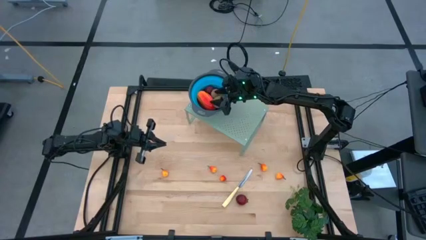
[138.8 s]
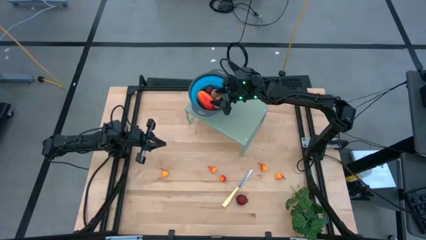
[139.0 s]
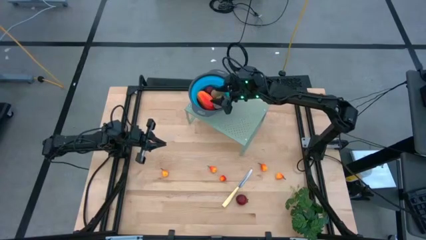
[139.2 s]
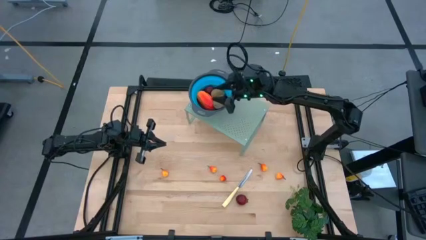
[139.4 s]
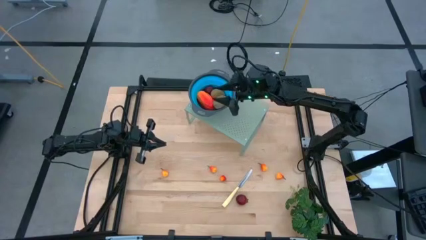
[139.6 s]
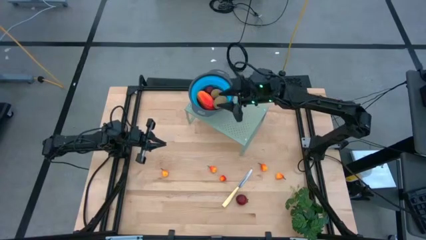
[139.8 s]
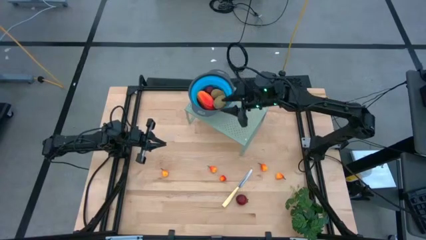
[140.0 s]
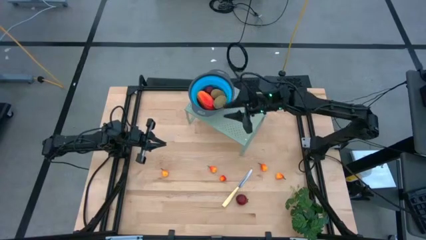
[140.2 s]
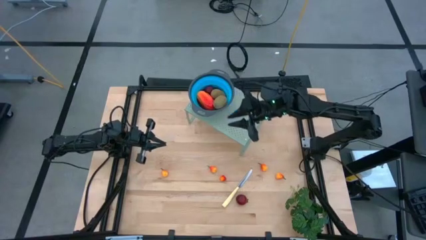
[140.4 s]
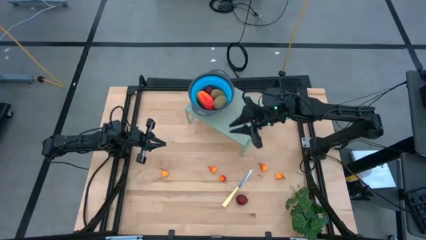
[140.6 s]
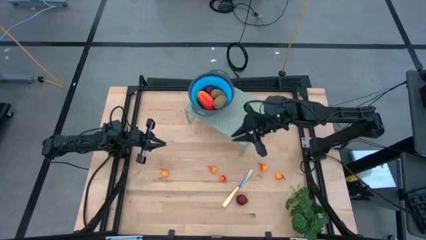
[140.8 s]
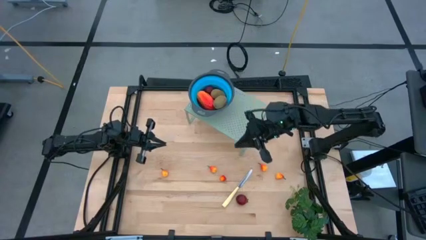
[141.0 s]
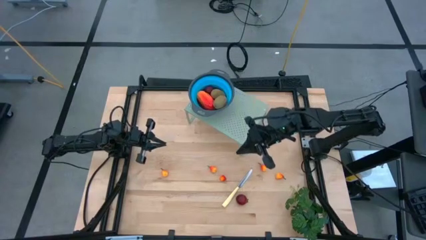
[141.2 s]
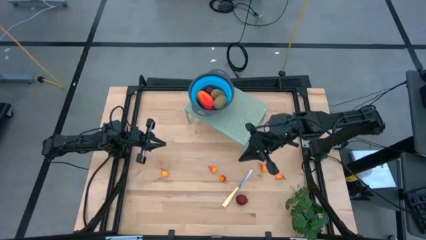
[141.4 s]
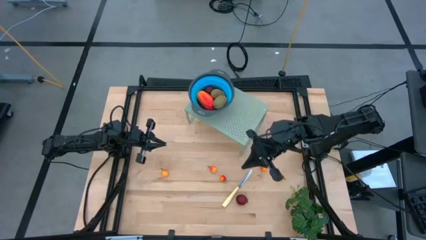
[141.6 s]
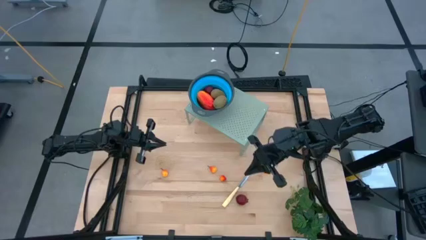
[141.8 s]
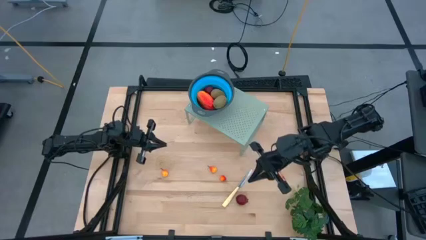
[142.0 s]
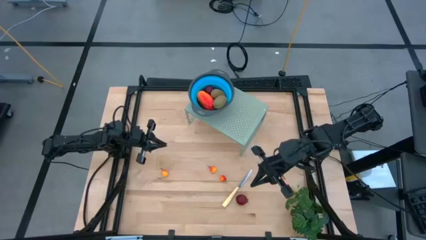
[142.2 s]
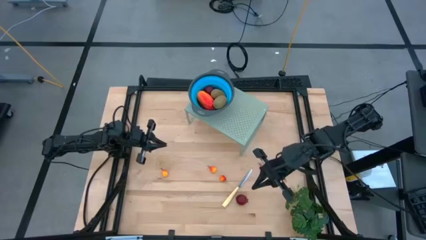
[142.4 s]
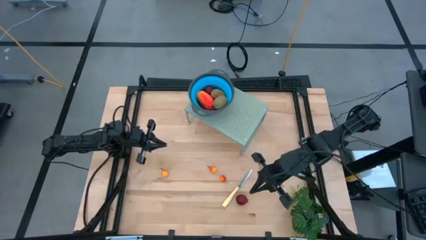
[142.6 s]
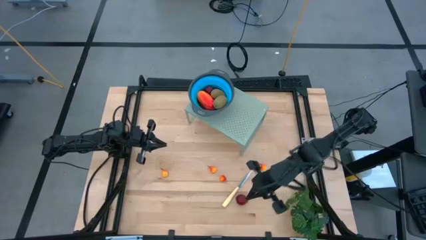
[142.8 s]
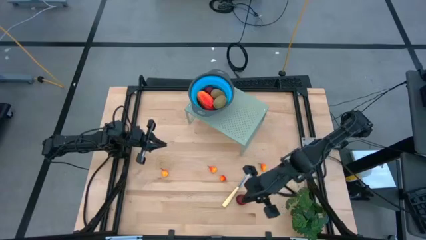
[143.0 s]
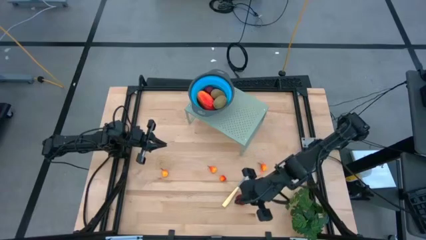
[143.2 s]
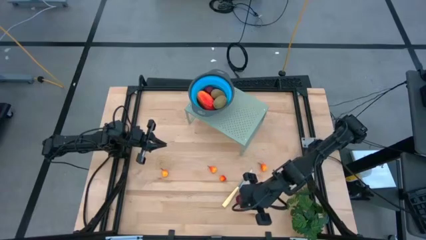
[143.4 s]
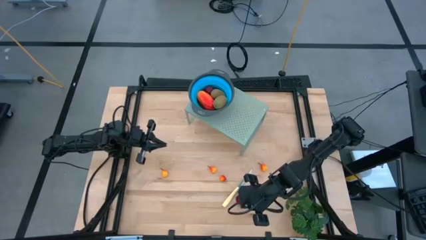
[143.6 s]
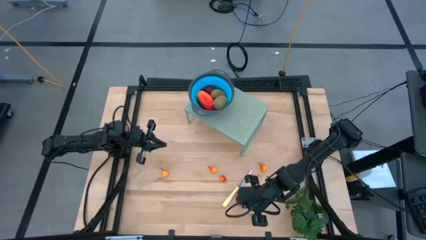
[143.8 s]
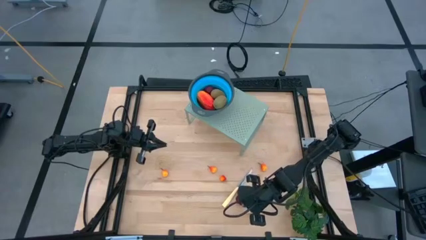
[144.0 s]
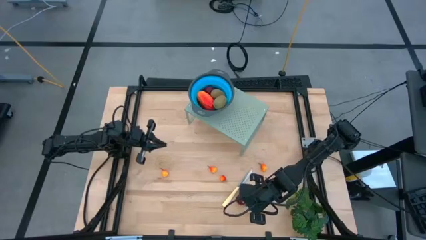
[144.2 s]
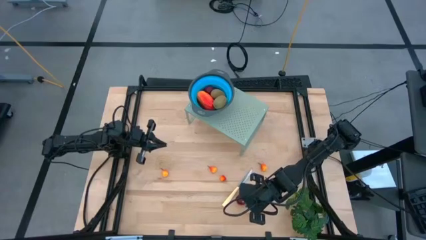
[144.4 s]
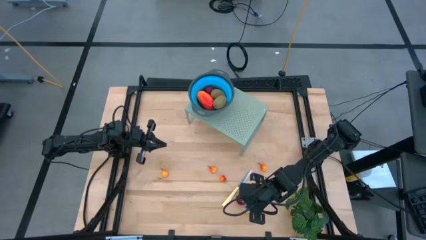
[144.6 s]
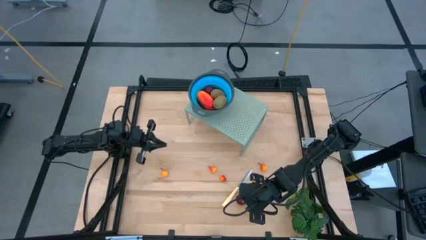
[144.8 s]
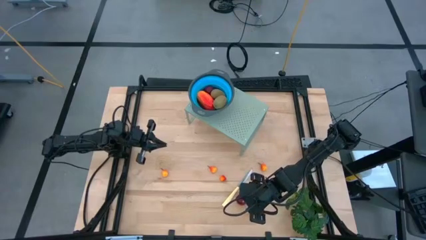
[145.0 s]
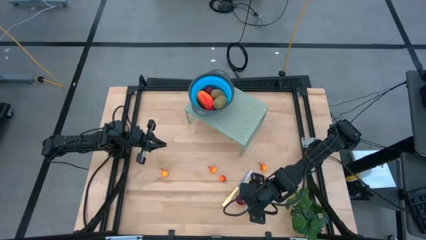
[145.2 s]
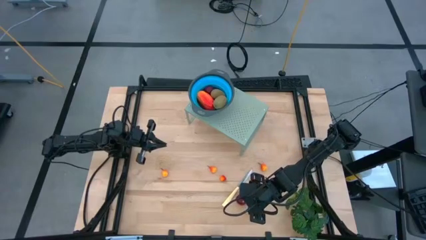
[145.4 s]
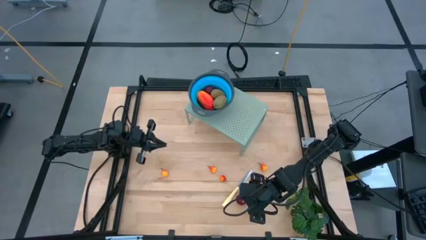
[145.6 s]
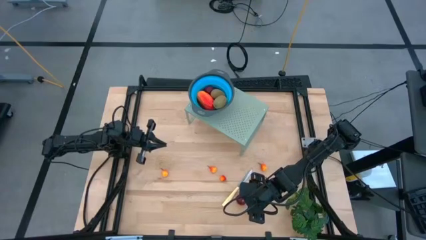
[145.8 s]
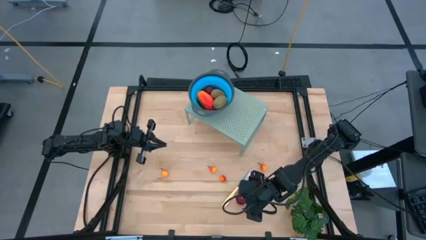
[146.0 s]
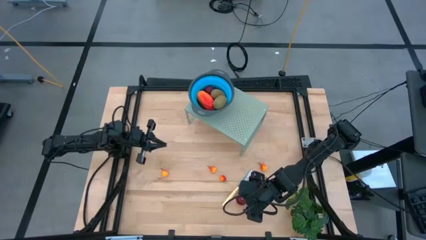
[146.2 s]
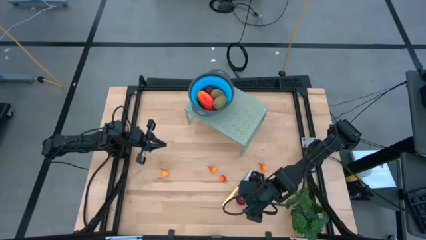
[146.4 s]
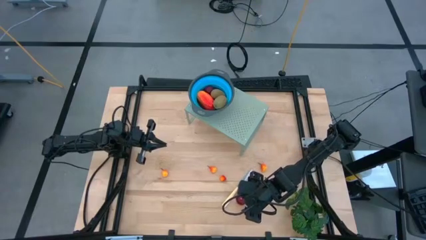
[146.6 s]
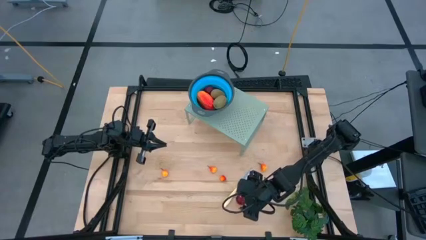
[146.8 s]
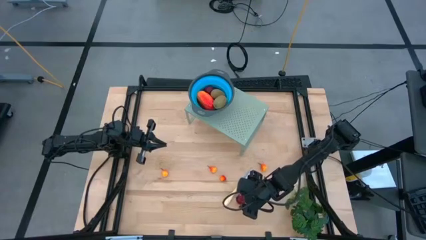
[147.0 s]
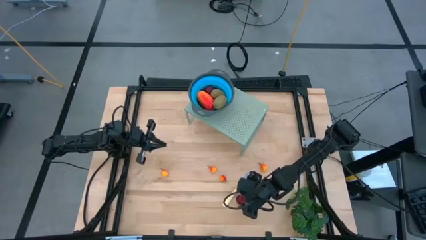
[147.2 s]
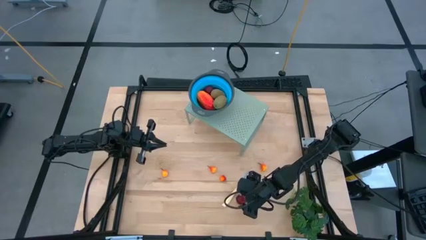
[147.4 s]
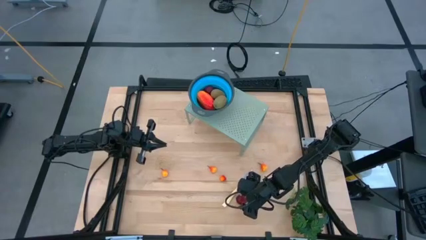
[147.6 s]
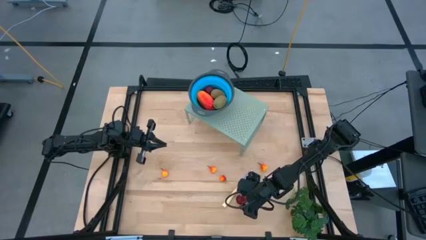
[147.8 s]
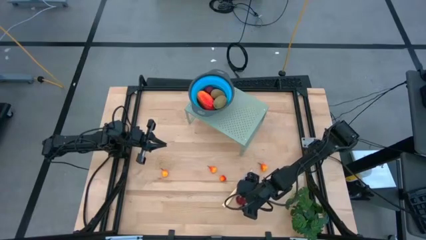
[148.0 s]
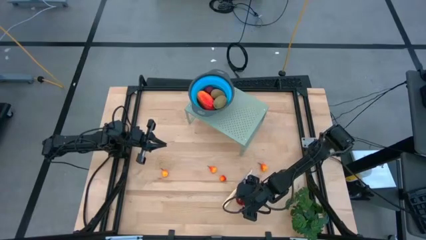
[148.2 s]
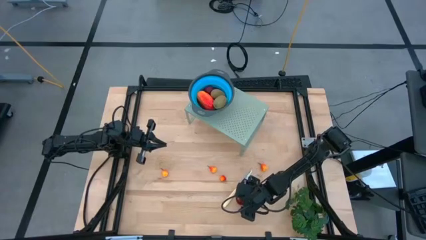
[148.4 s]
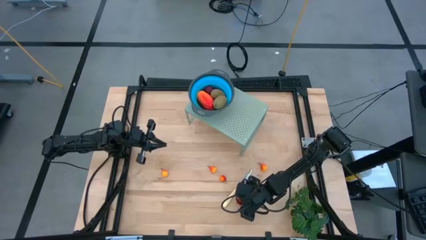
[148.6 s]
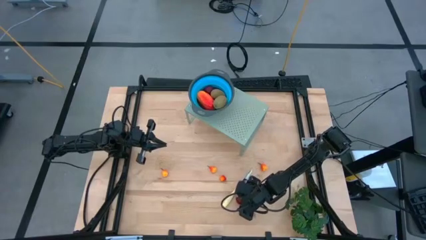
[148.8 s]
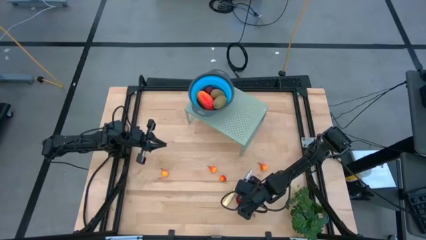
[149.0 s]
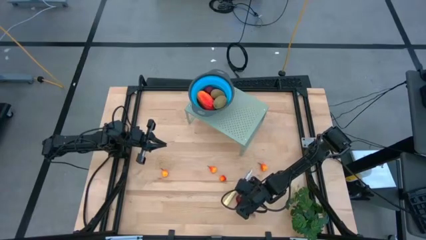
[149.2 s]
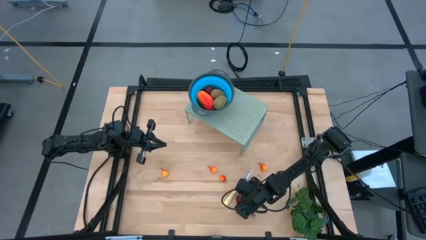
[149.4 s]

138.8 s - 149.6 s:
Task: Pick & Place Fruit
Put the pomegranate into the blue strainer bowl on the shelf
